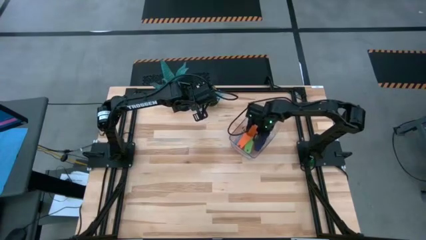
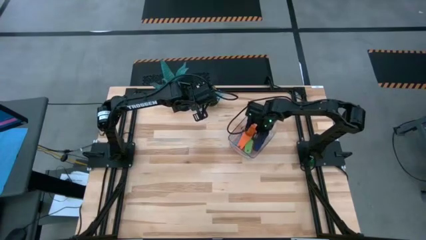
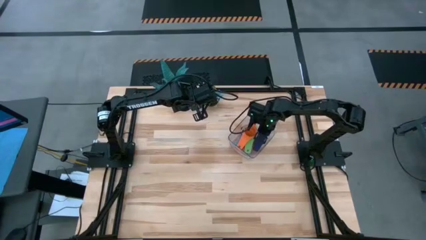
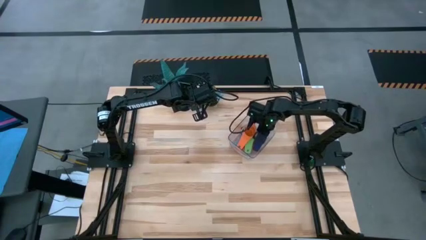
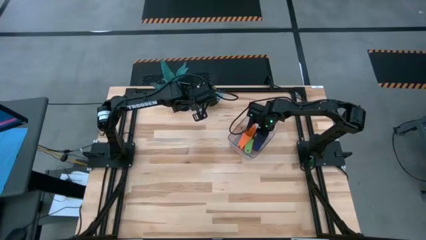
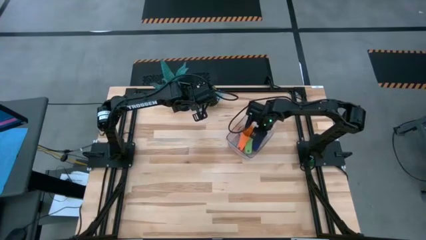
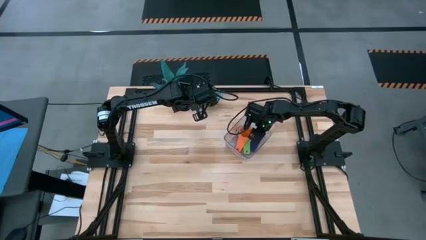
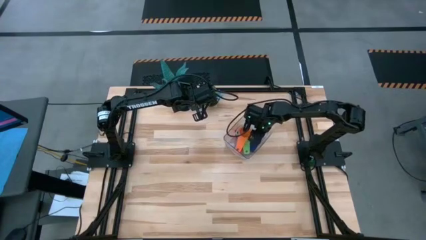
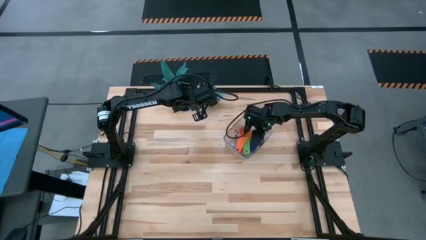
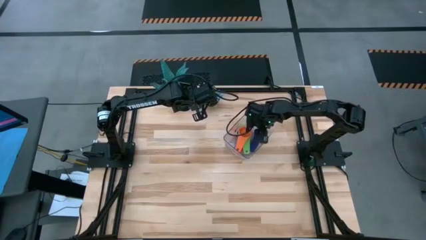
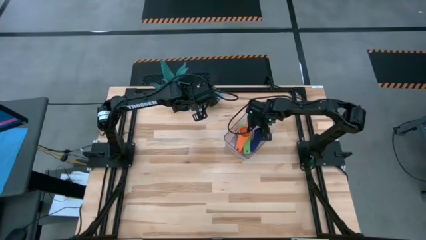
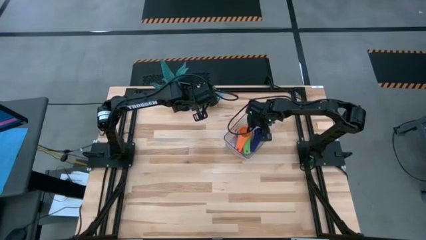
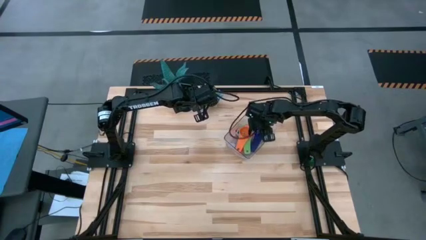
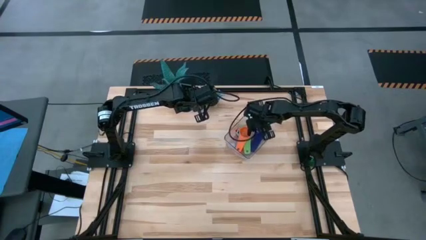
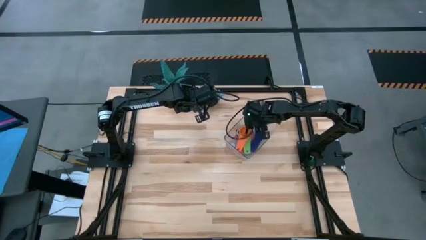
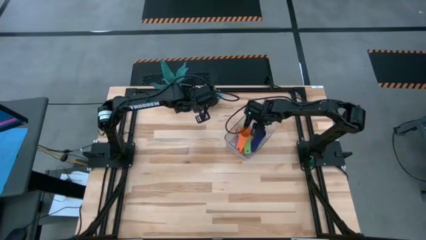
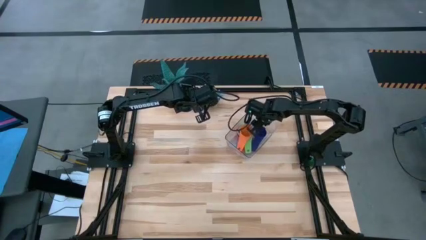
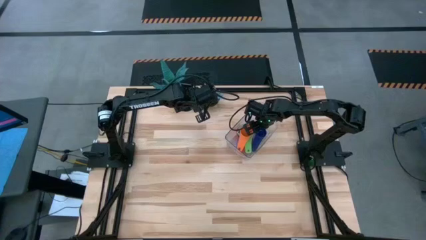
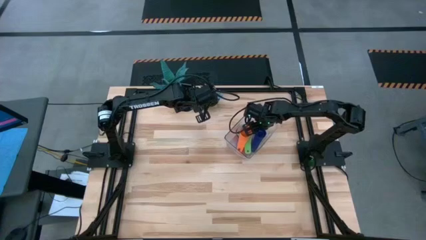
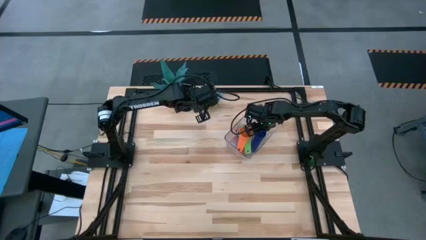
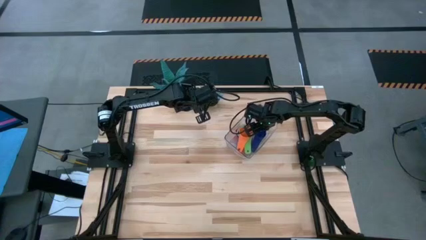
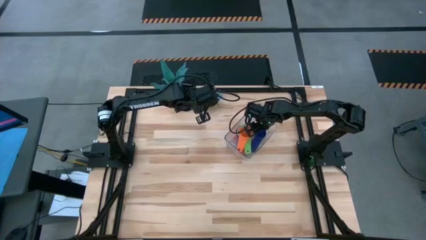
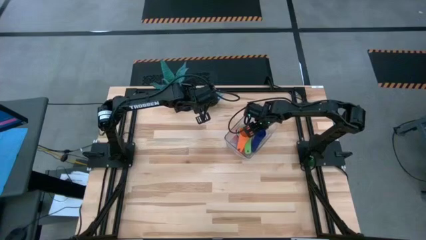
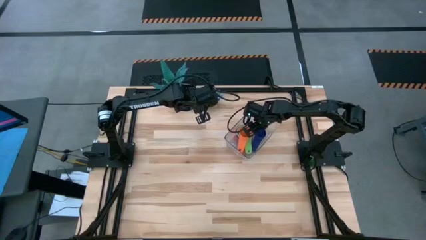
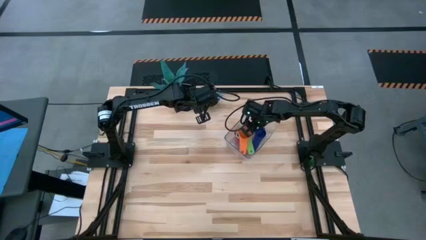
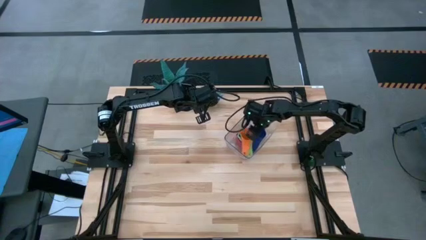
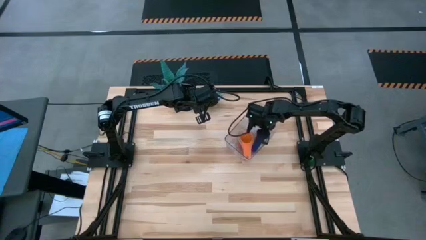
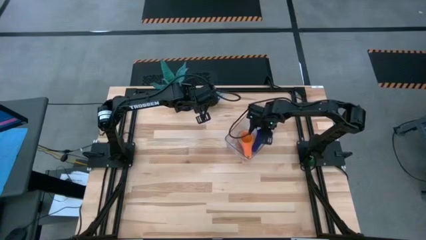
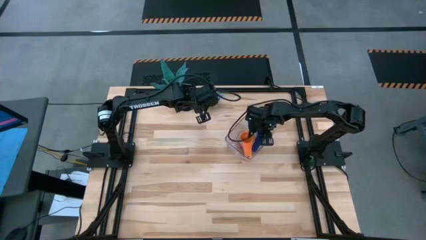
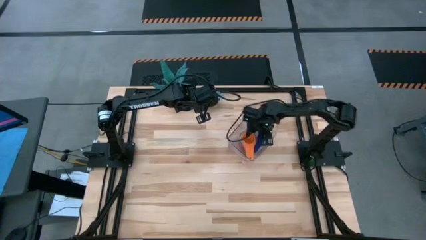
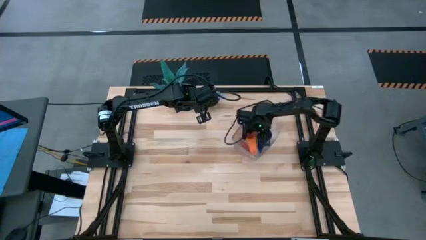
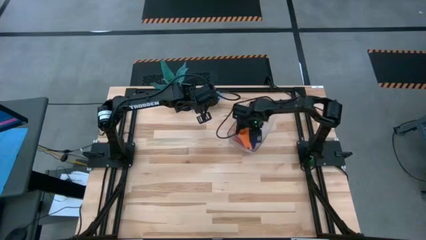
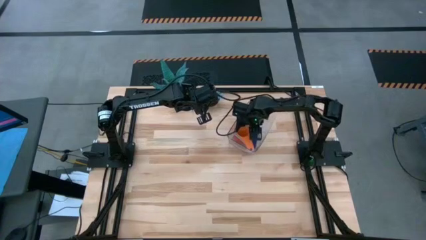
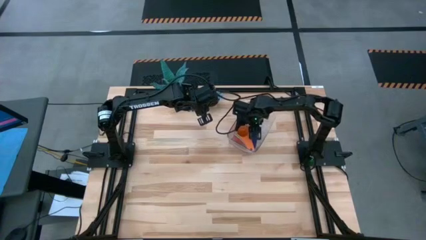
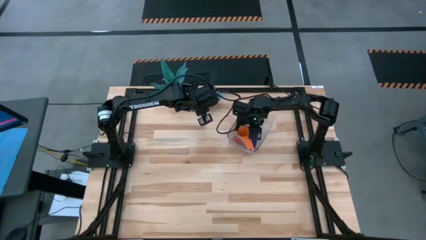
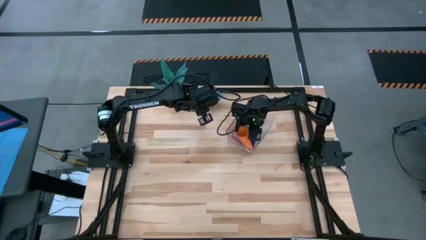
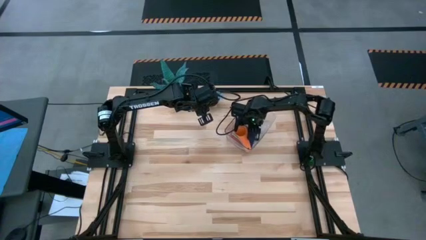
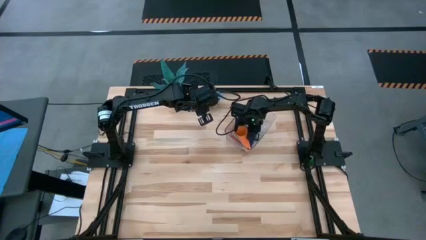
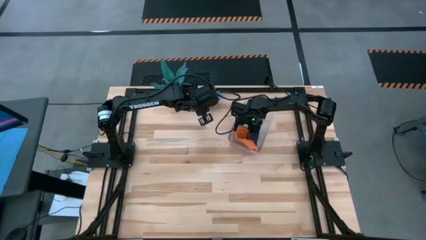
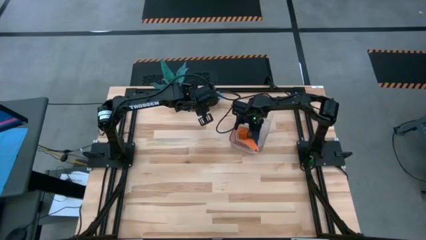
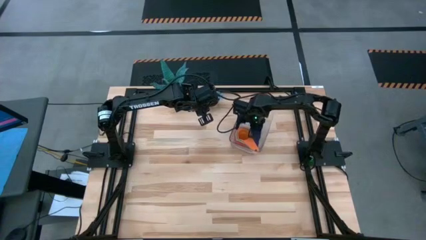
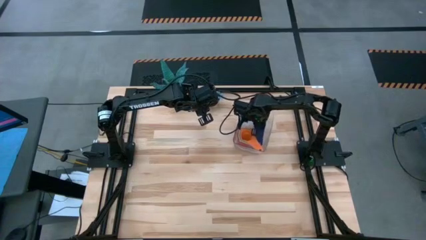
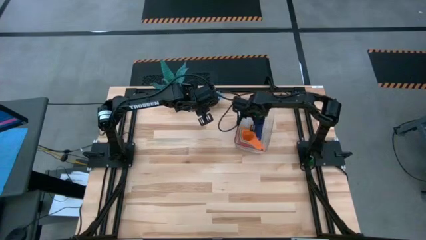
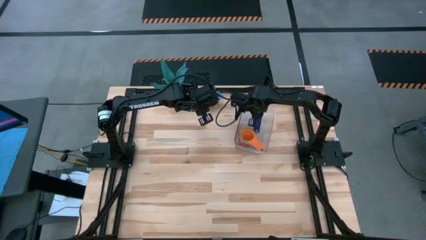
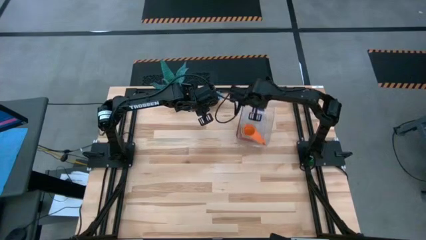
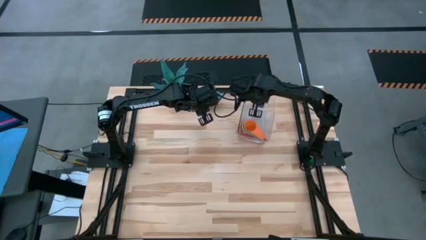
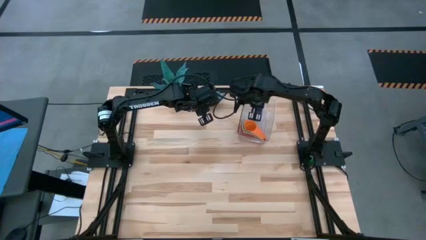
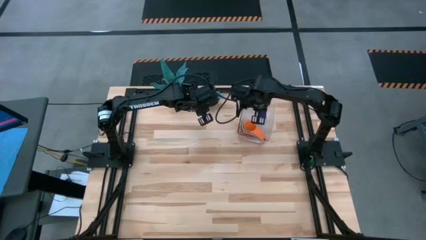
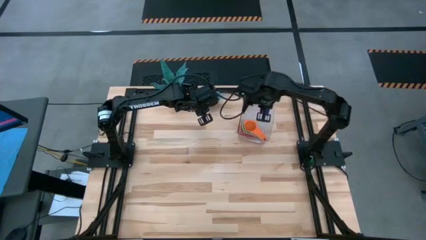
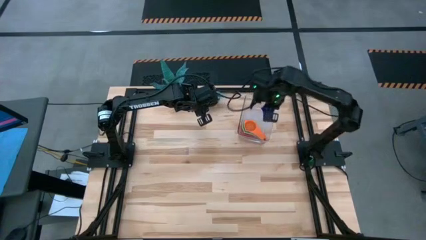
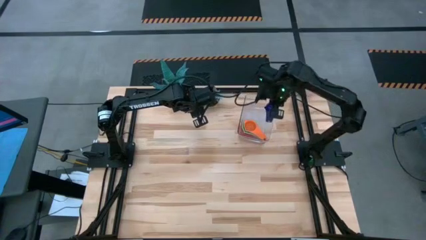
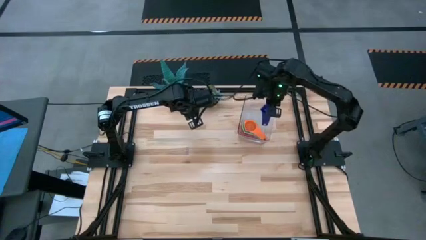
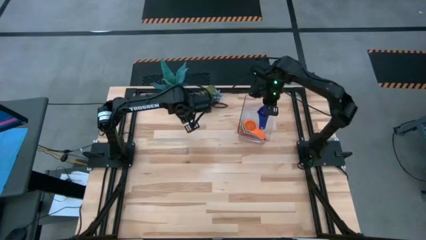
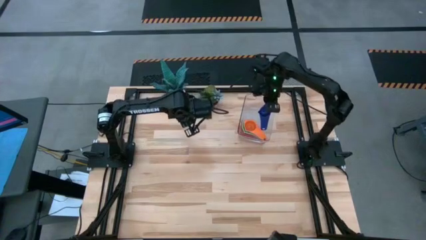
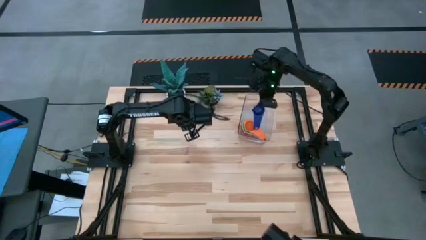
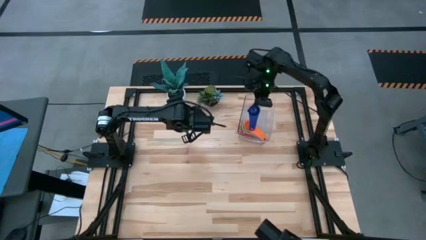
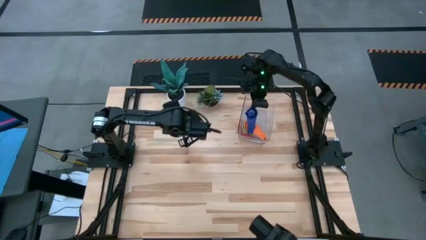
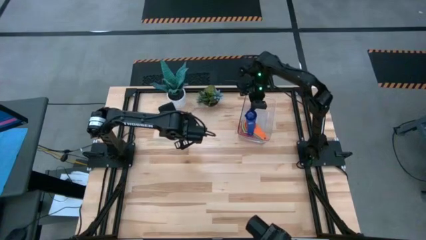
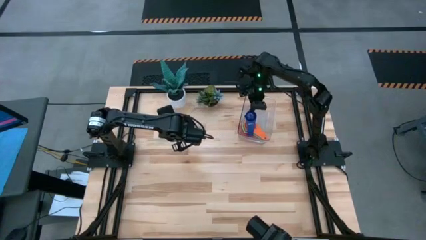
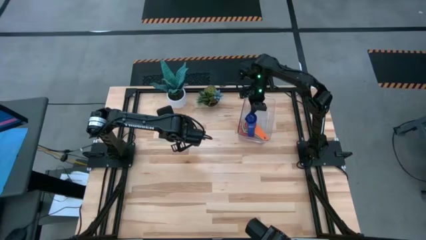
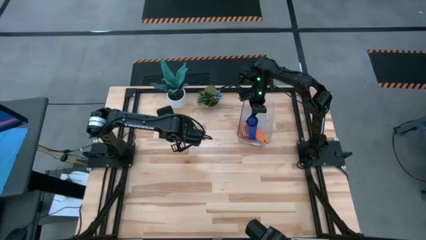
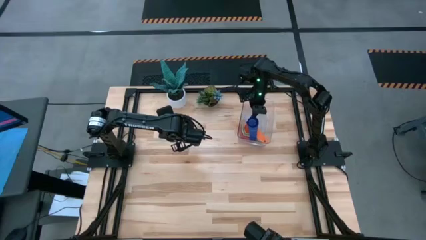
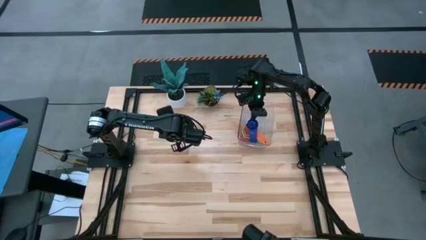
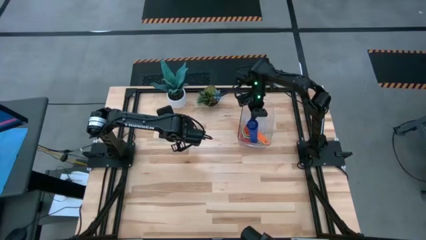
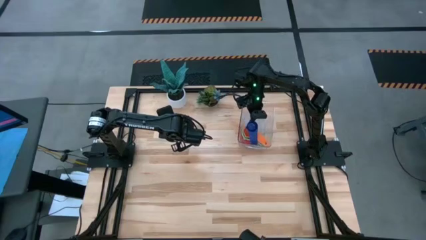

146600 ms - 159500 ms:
Task: Nest measuring cups in basket
Adjust the nested measuring cups in the transparent bin

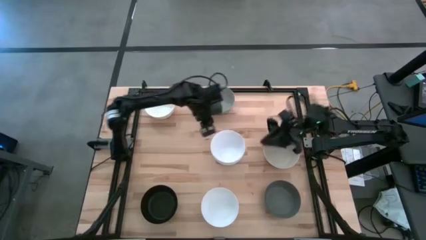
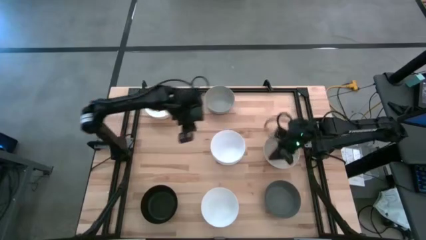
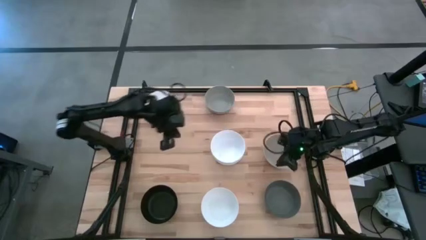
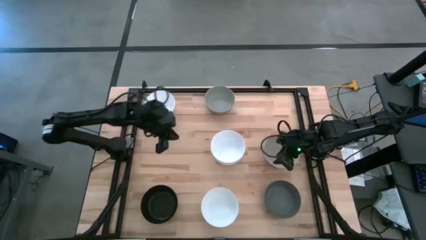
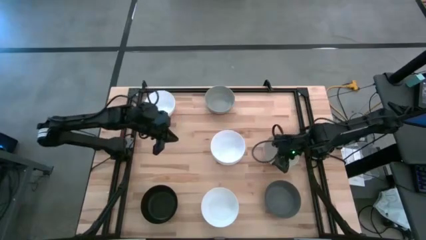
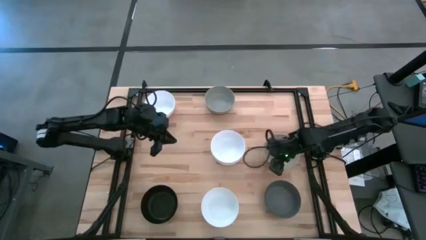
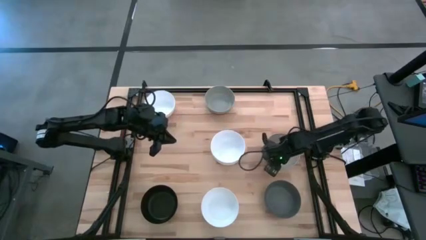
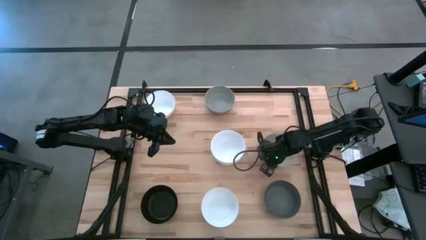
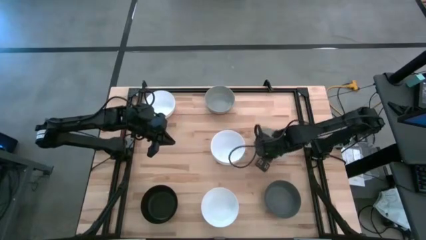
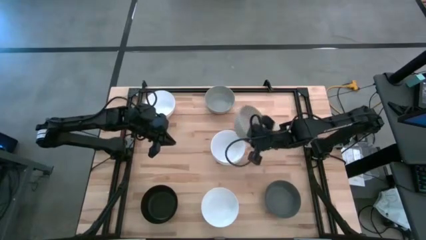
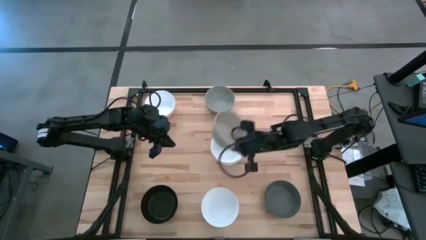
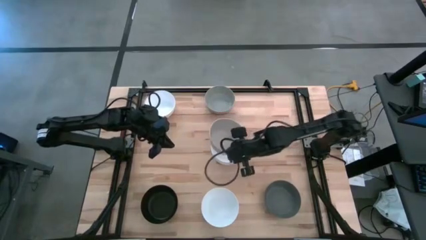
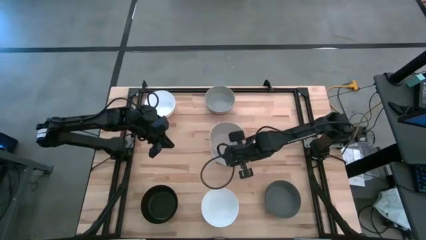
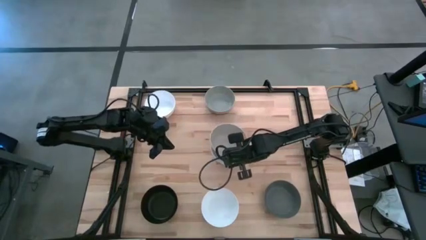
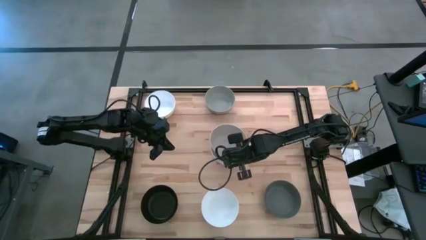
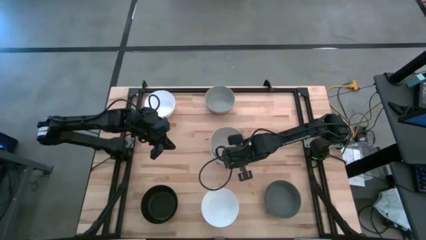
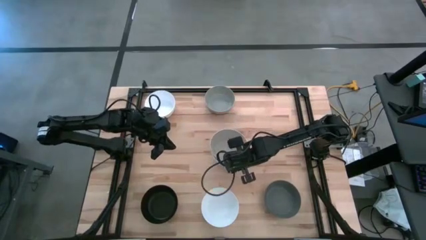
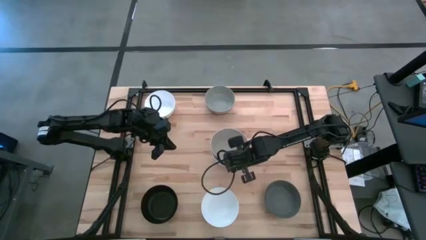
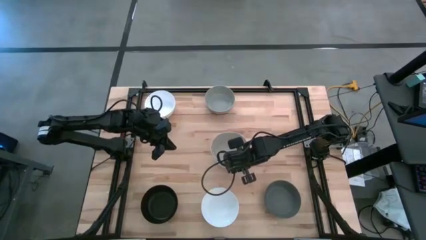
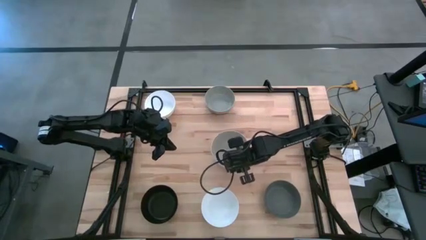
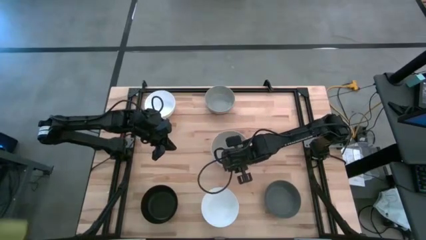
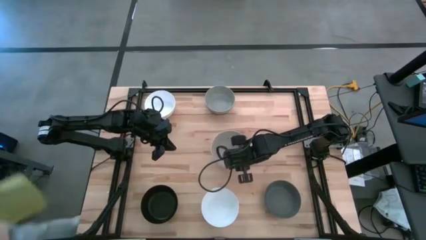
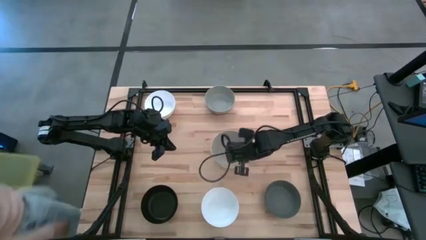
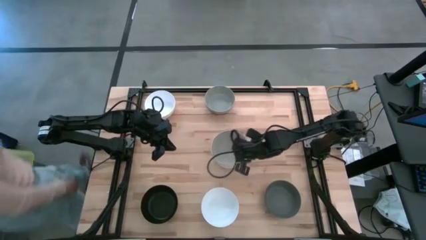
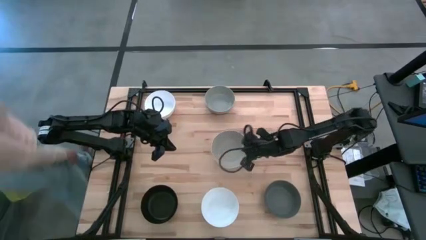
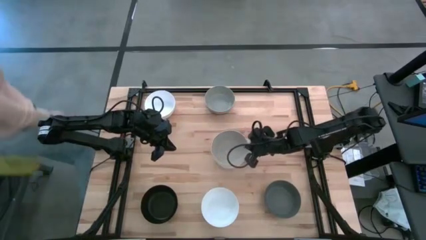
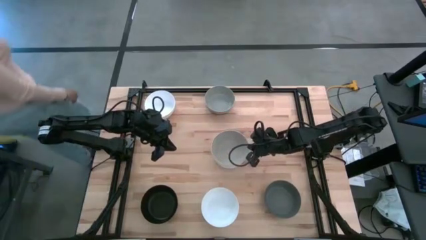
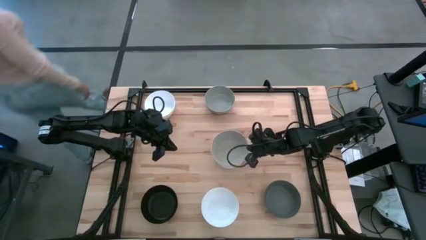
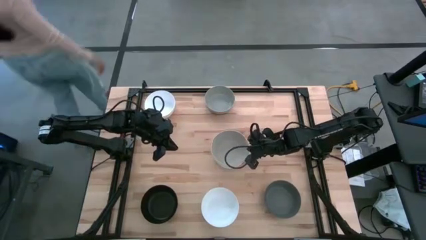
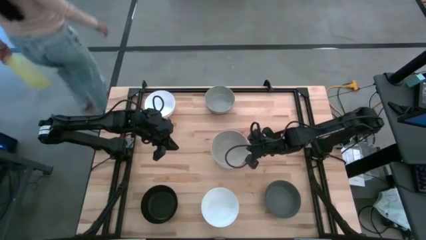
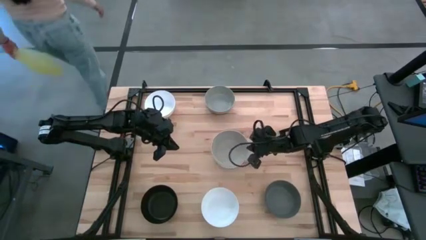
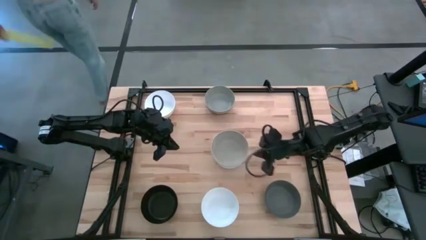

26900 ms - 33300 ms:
Task: Nest bowls inside each other
Stack the brown bowl on the middle white bowl
